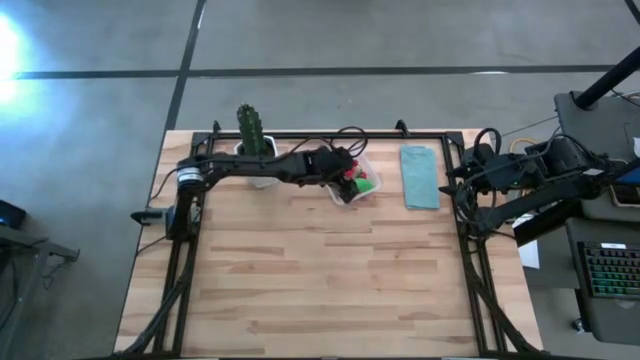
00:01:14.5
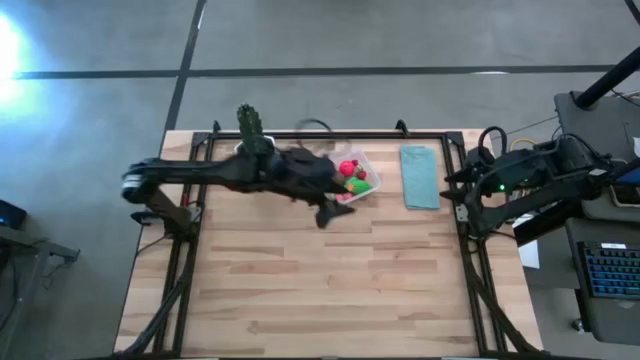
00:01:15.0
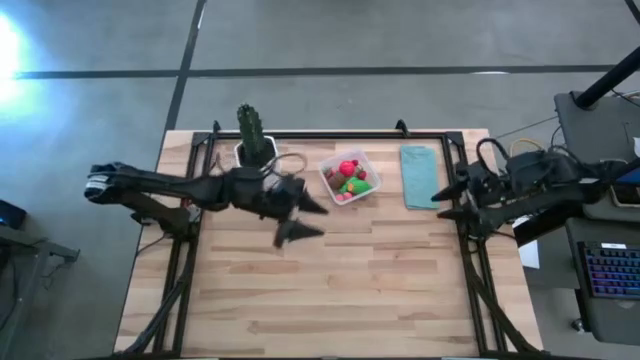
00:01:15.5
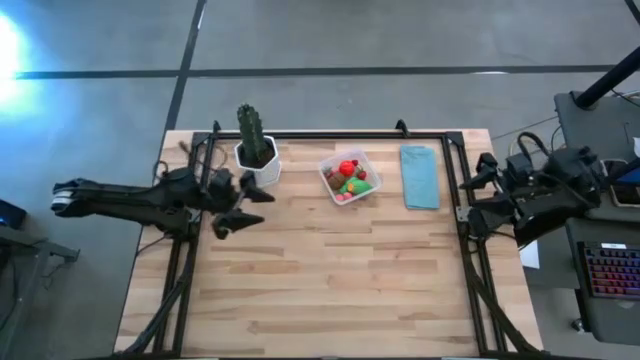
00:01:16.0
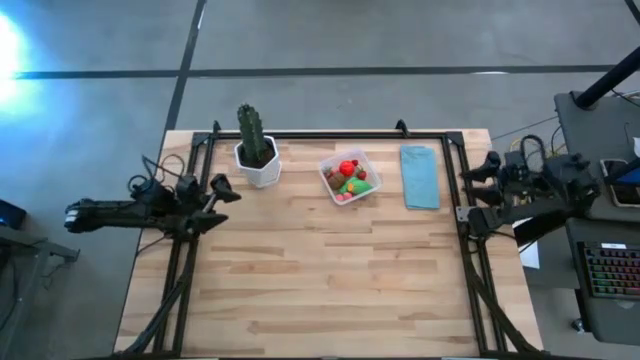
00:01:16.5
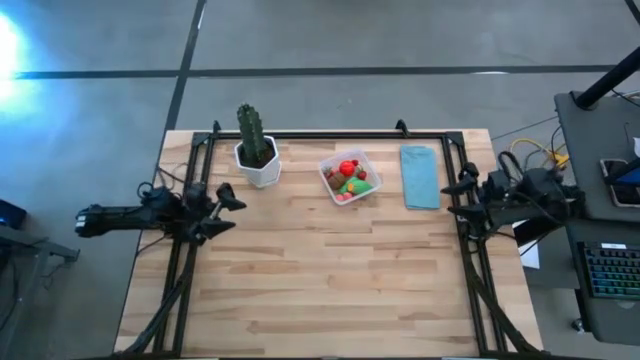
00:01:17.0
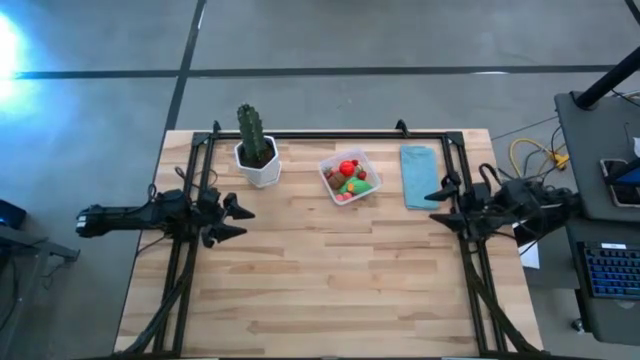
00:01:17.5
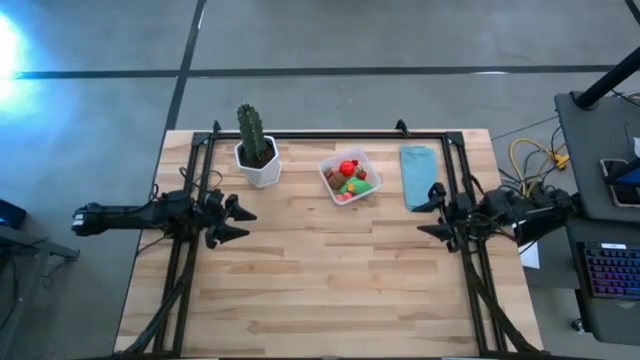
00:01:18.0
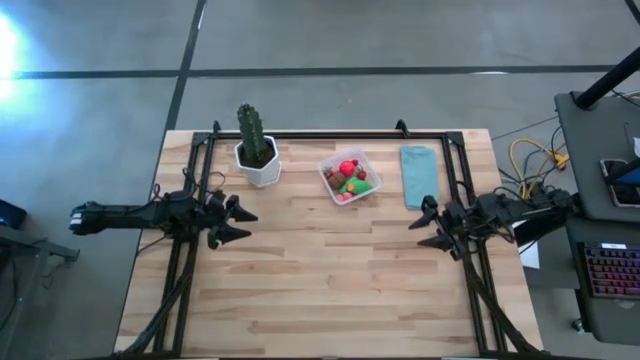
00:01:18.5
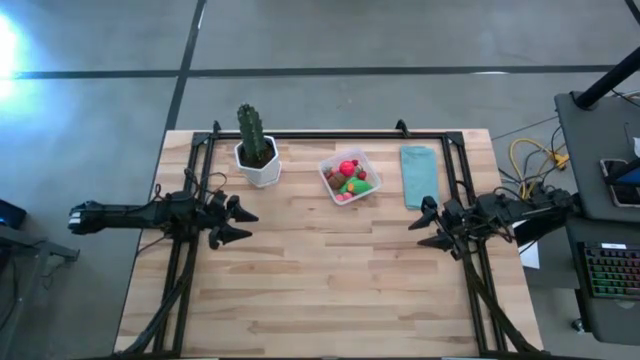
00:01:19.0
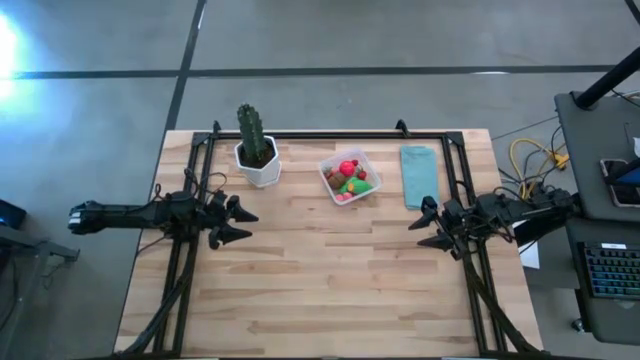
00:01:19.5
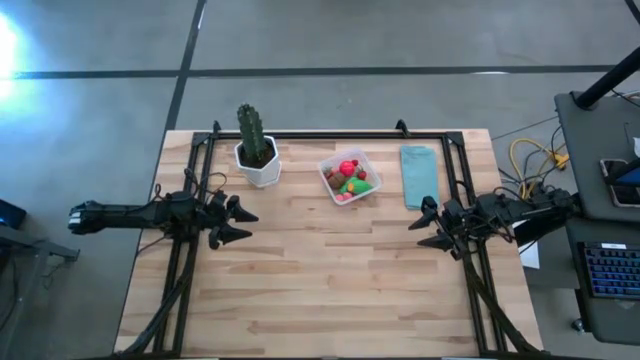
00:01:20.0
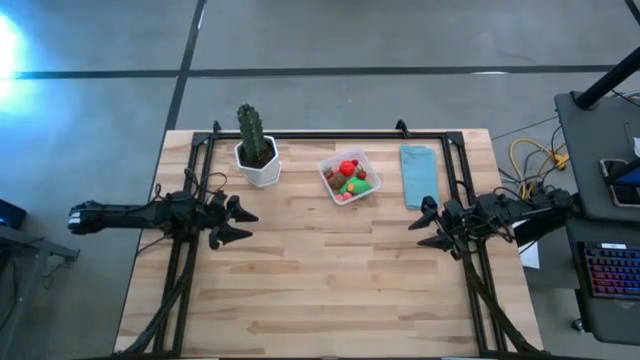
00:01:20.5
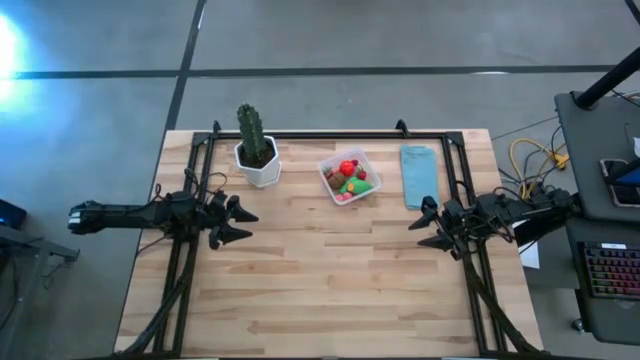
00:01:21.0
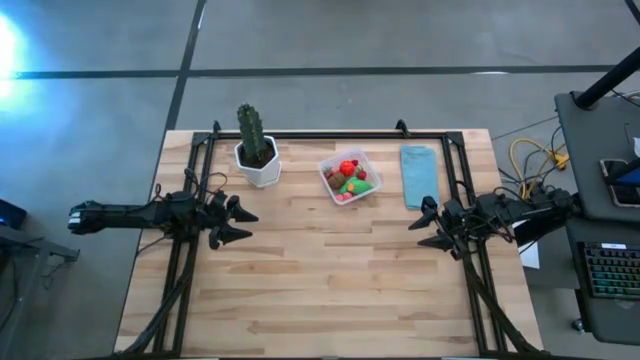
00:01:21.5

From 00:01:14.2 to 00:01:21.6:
Task: Pick and placing Produce into tupperware
Return to Home Position

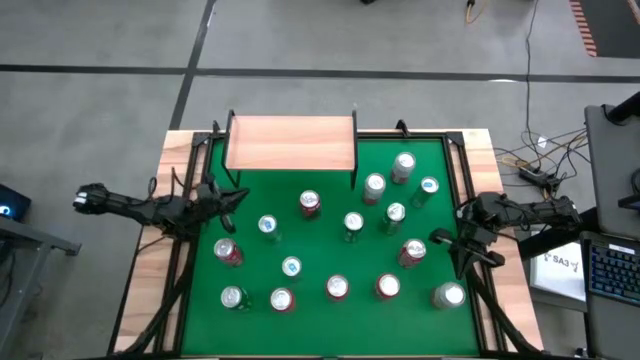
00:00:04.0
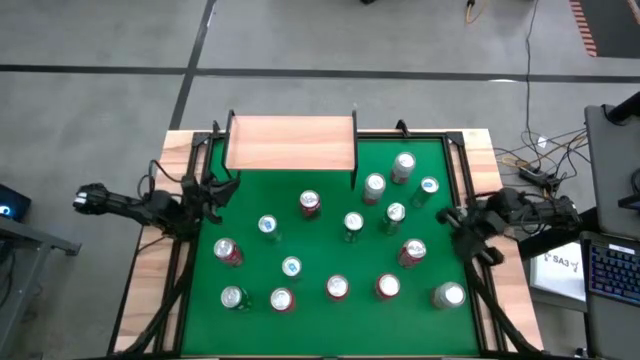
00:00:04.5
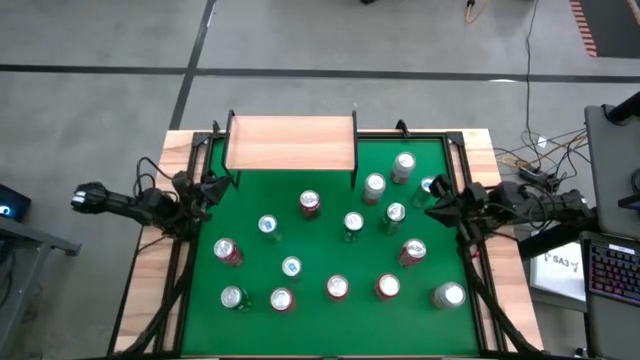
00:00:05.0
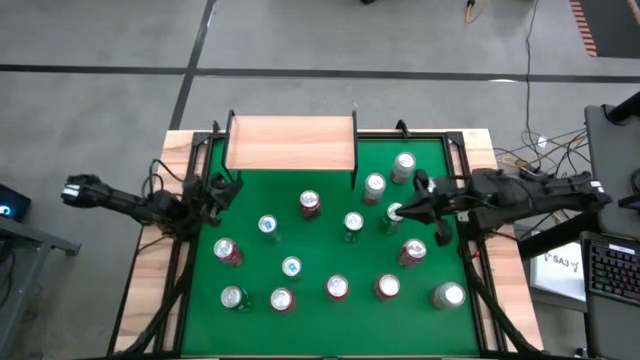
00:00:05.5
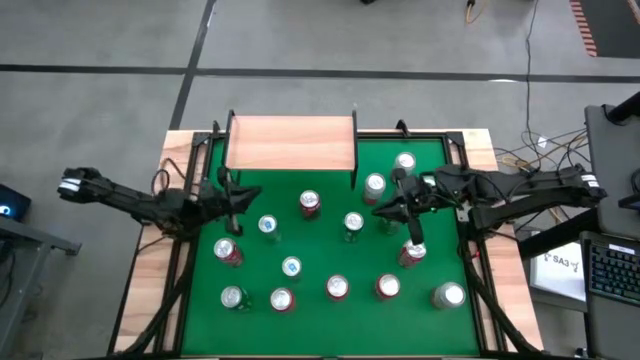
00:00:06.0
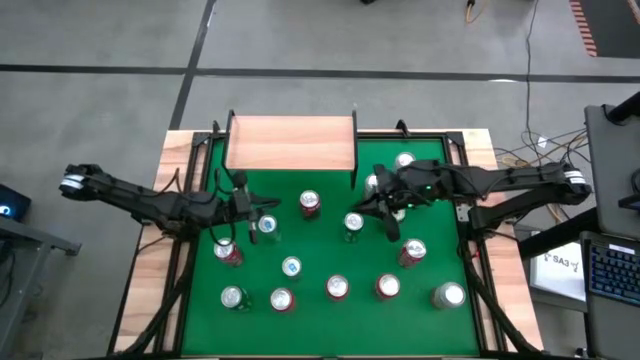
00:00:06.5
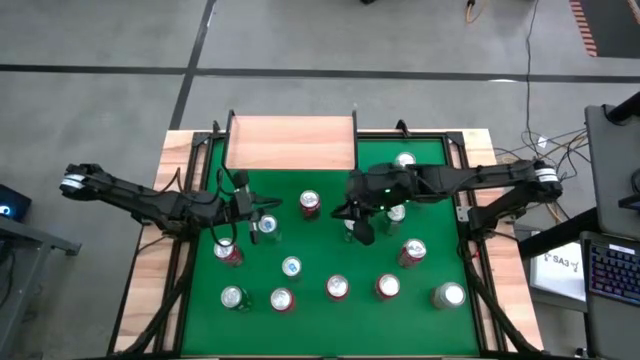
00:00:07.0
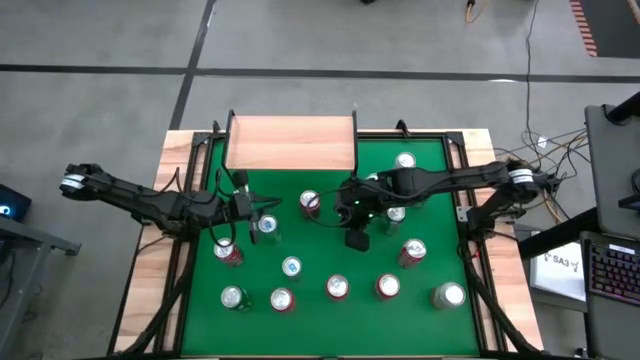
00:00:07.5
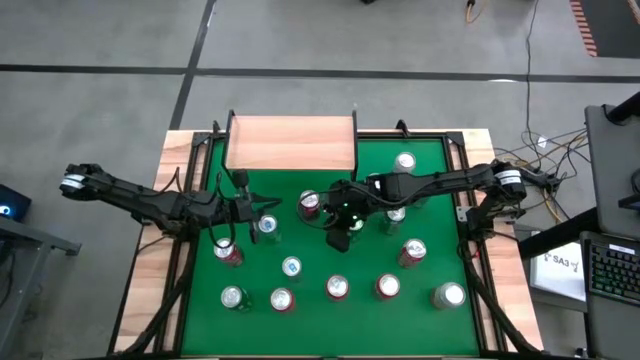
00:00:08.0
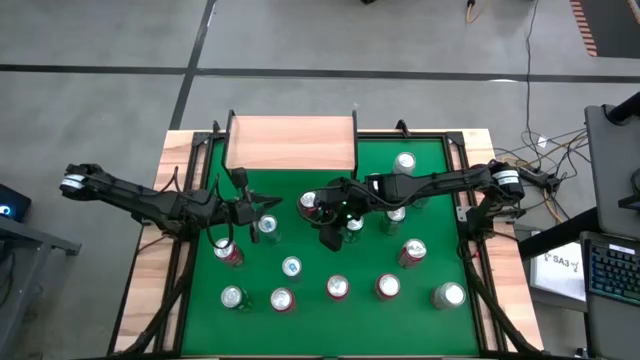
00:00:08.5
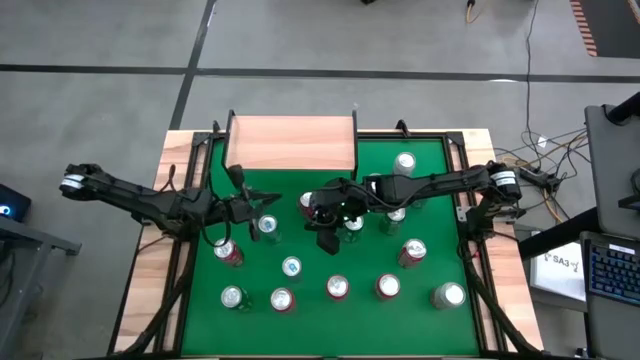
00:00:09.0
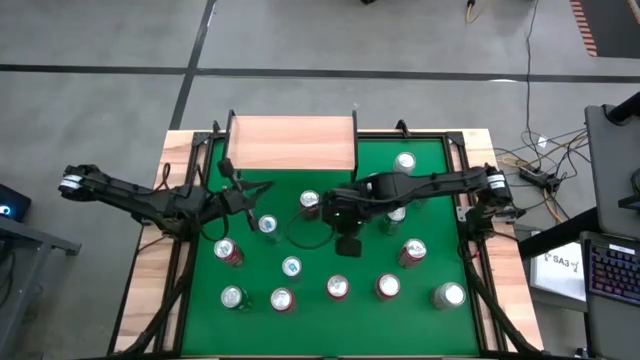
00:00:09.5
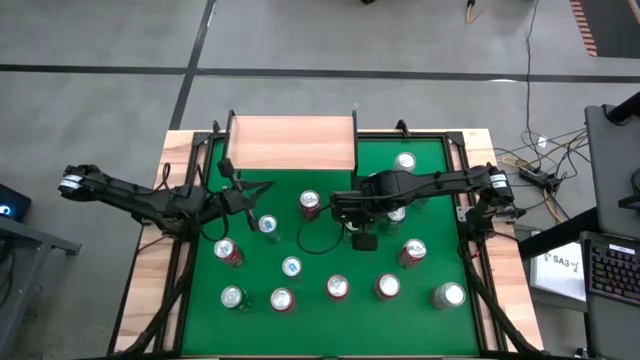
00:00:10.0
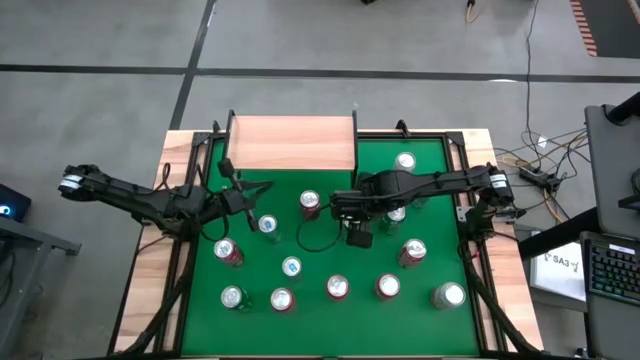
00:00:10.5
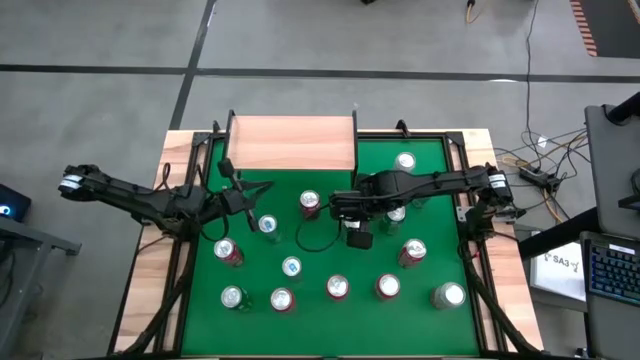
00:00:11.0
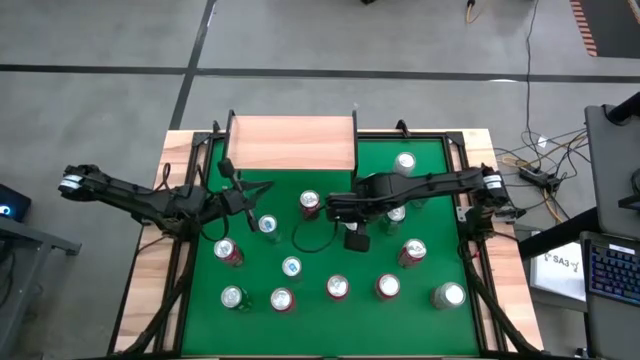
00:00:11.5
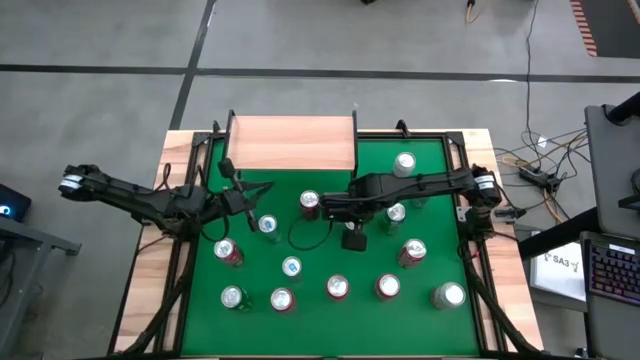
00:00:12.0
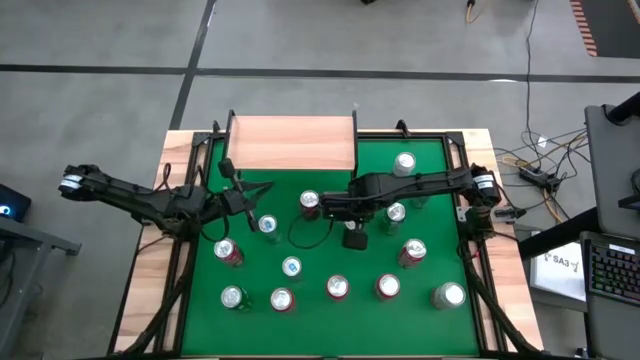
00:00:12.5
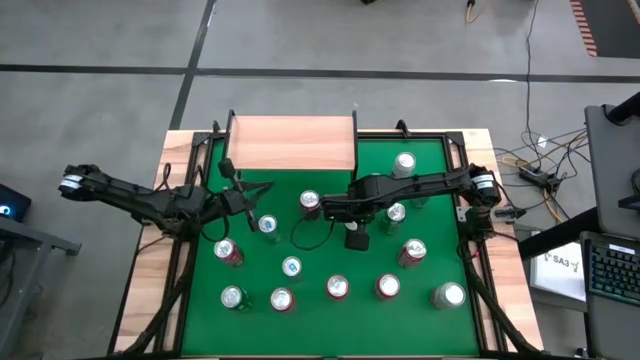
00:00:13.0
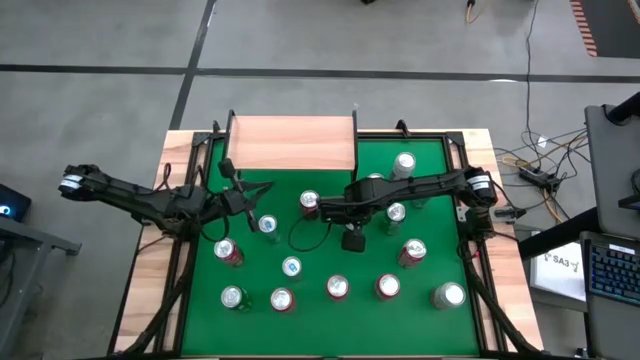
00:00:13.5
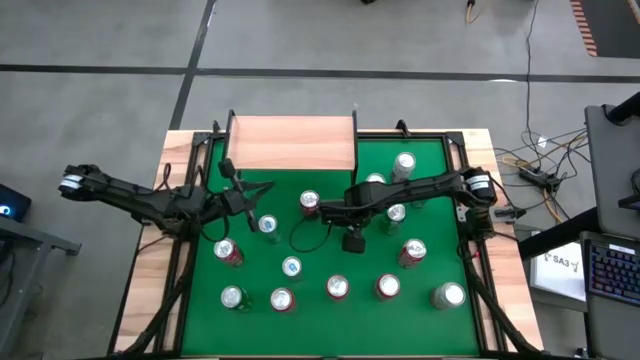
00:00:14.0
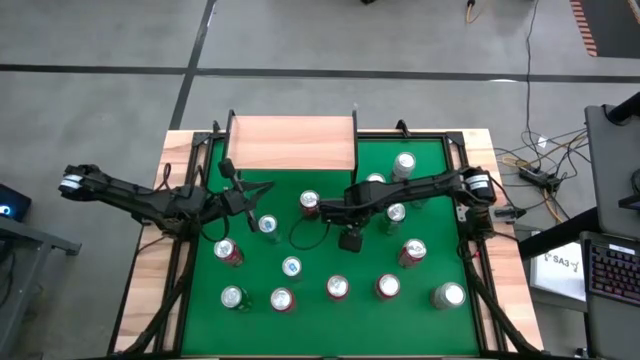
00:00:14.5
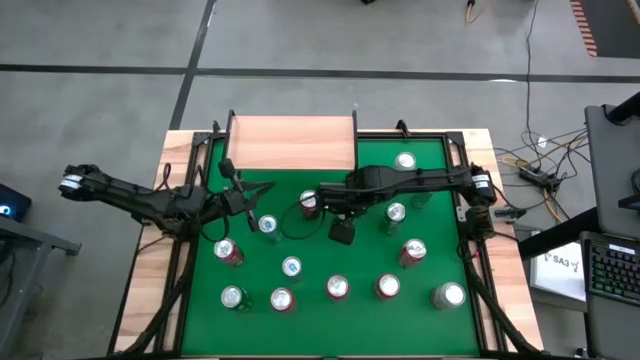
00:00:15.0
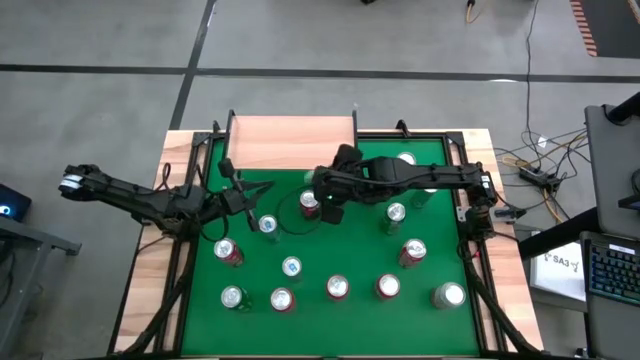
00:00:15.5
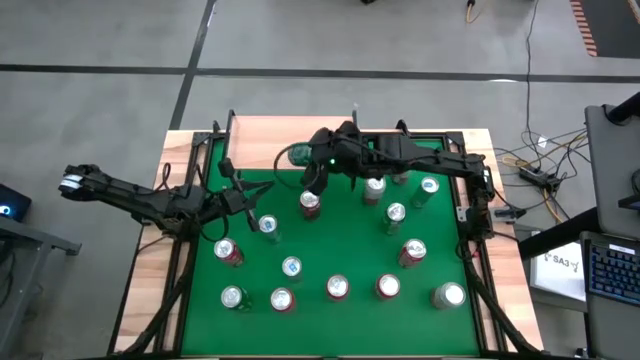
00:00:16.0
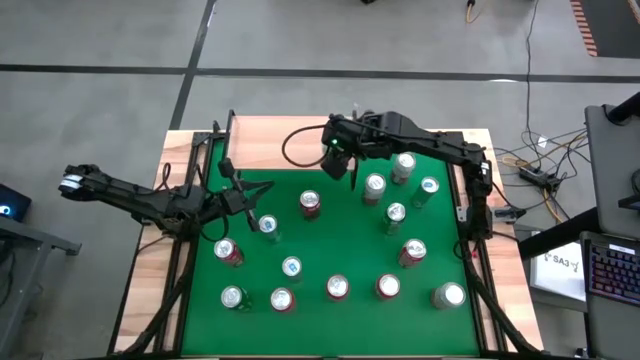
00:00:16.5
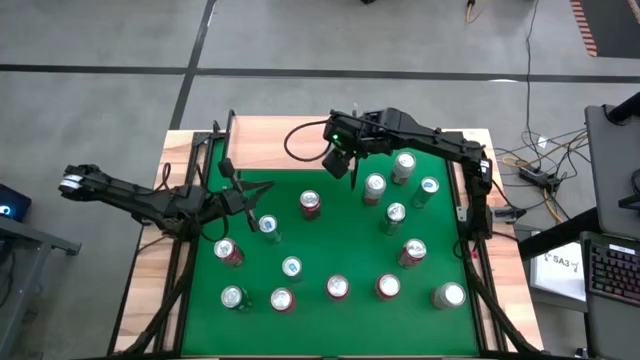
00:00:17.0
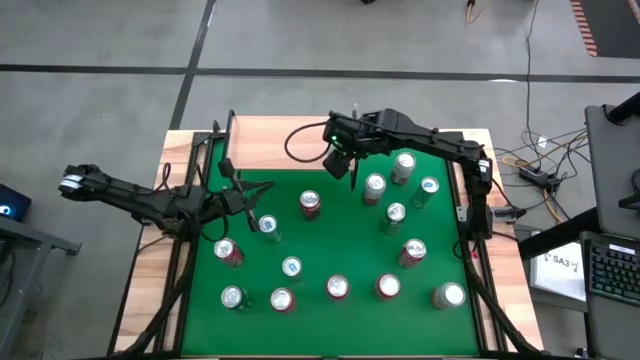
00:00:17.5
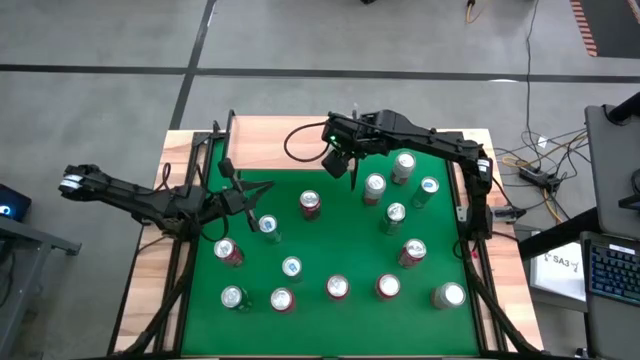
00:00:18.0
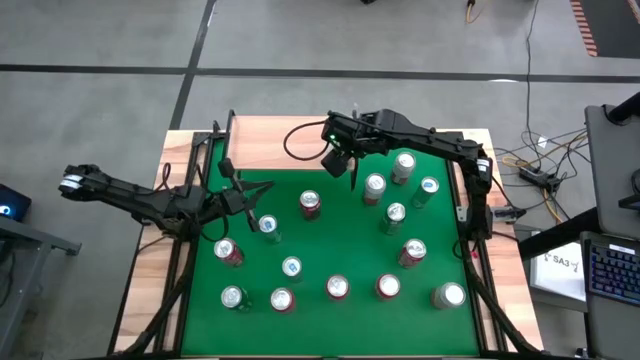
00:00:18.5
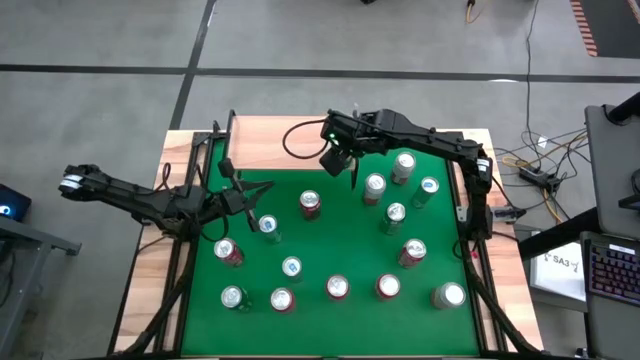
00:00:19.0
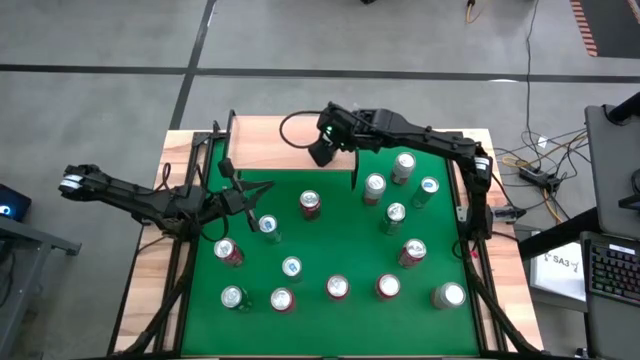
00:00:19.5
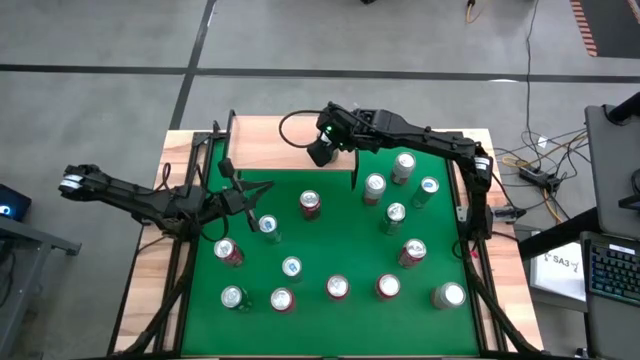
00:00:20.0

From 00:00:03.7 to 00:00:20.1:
Task: Place canned beverage on shelf
Put the green can on the shelf
